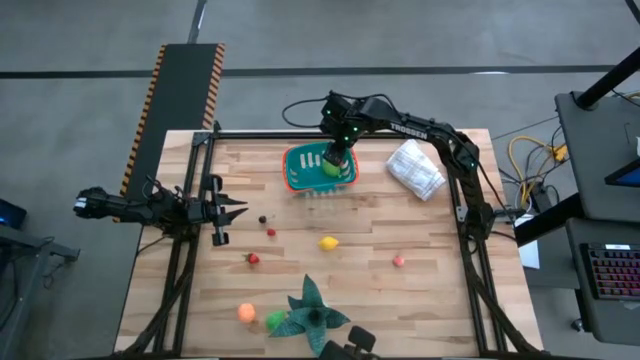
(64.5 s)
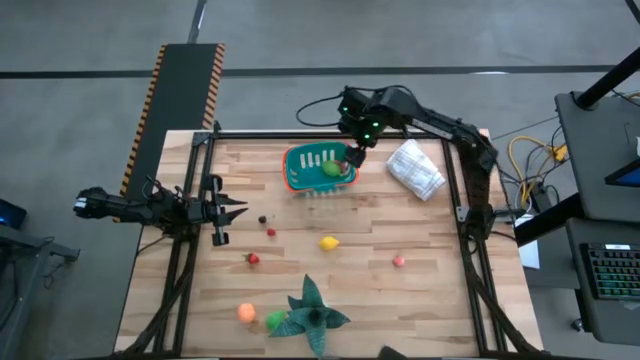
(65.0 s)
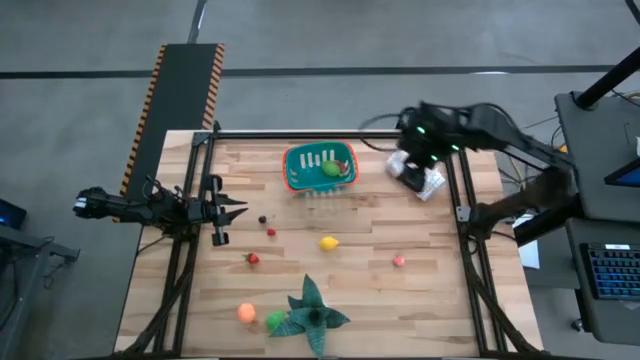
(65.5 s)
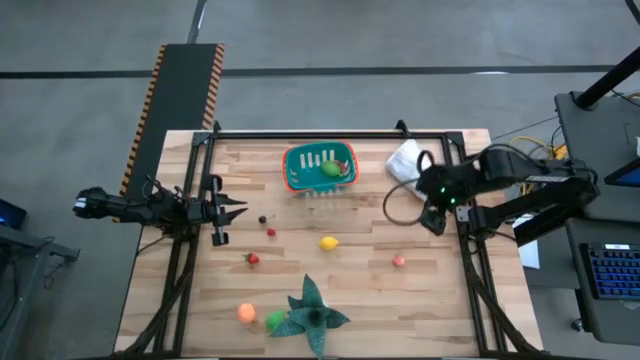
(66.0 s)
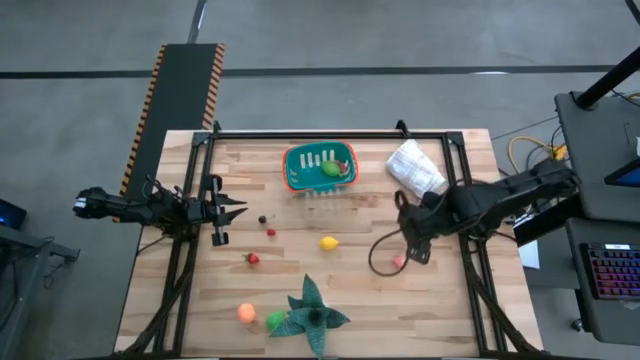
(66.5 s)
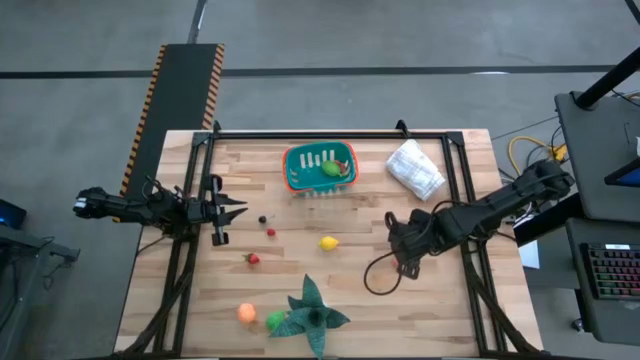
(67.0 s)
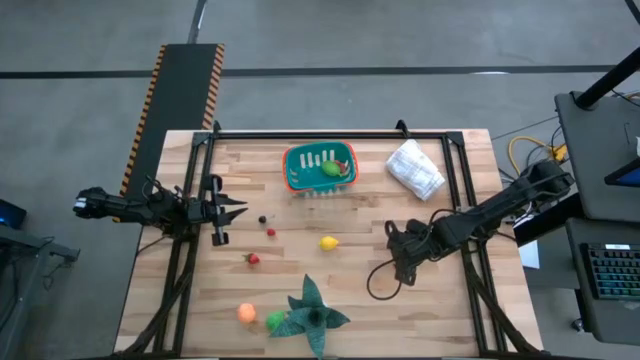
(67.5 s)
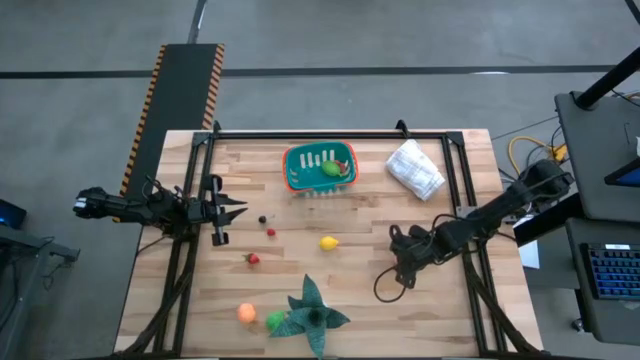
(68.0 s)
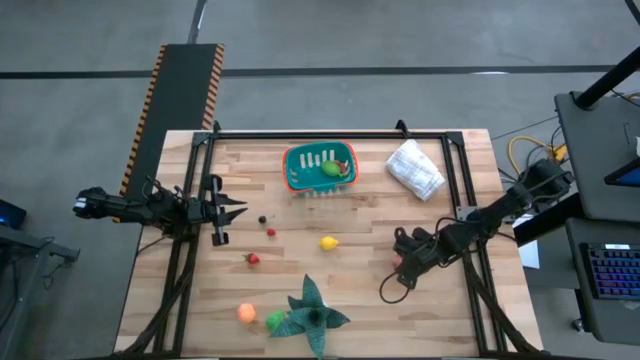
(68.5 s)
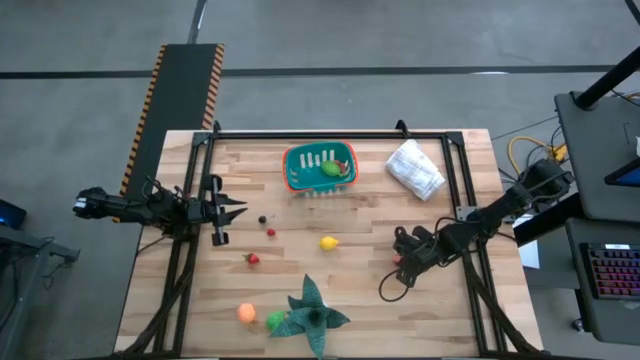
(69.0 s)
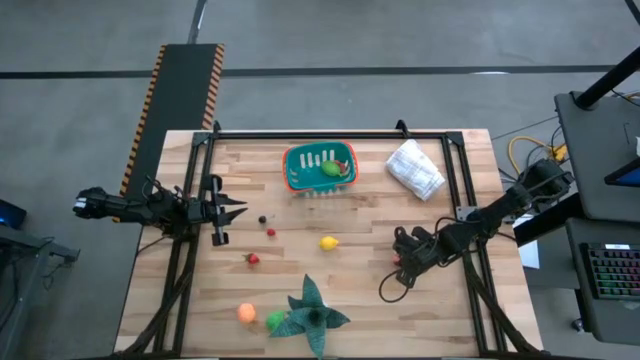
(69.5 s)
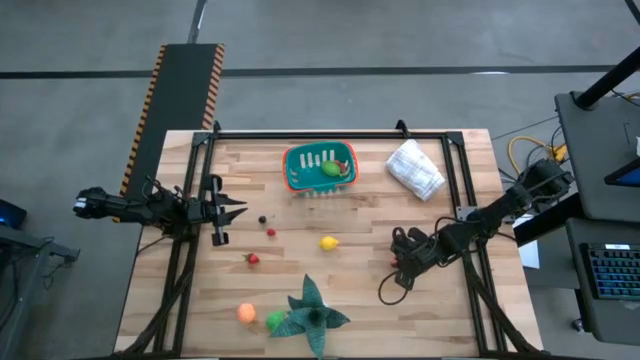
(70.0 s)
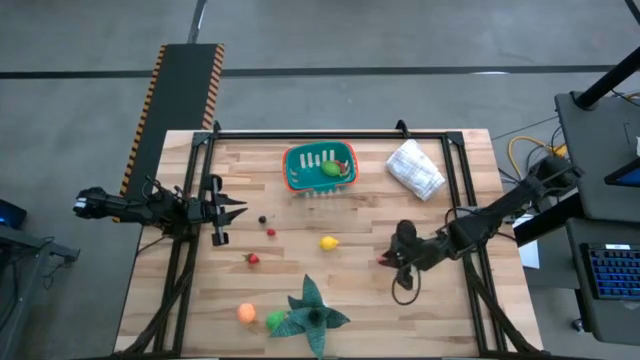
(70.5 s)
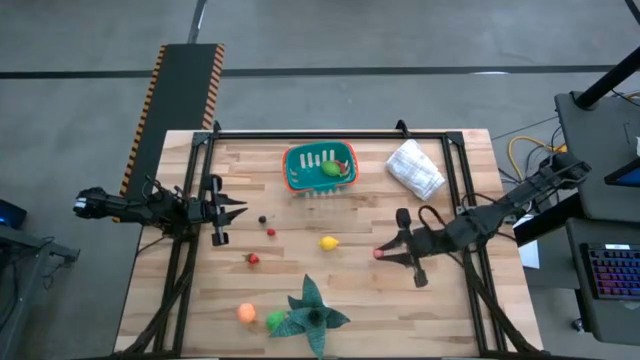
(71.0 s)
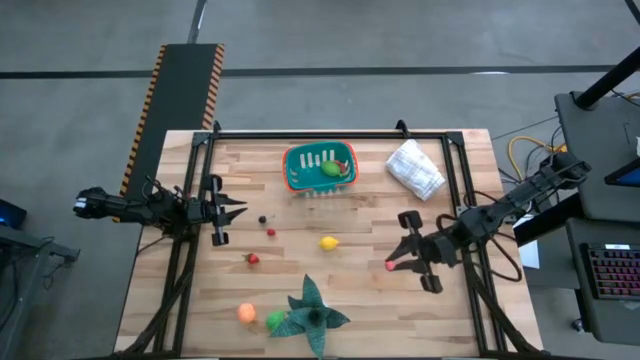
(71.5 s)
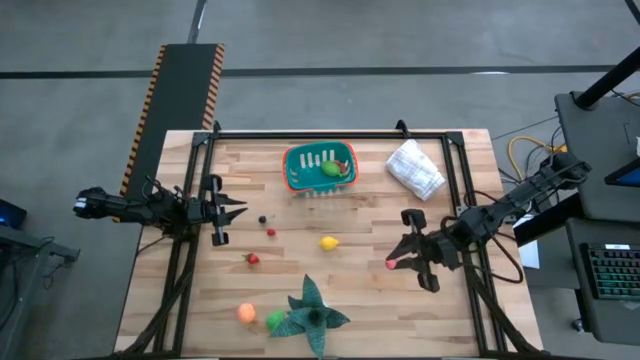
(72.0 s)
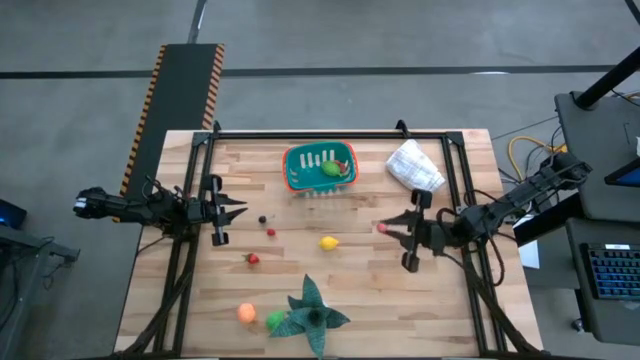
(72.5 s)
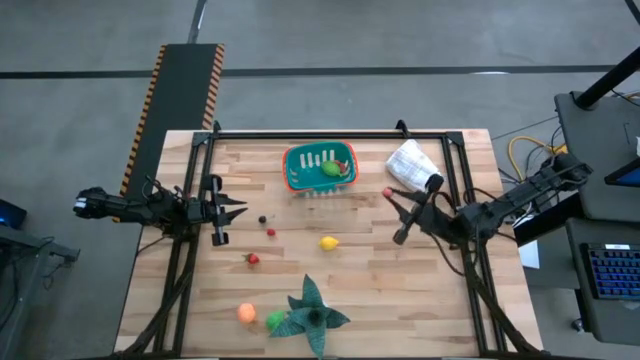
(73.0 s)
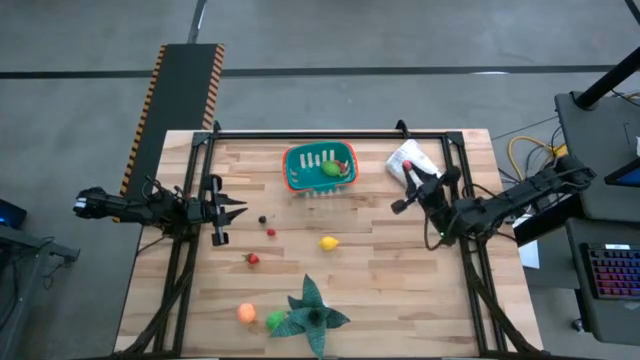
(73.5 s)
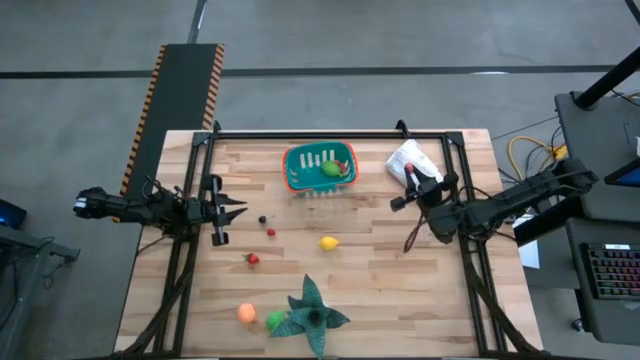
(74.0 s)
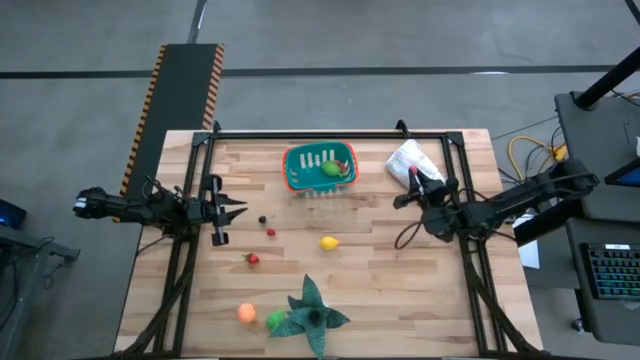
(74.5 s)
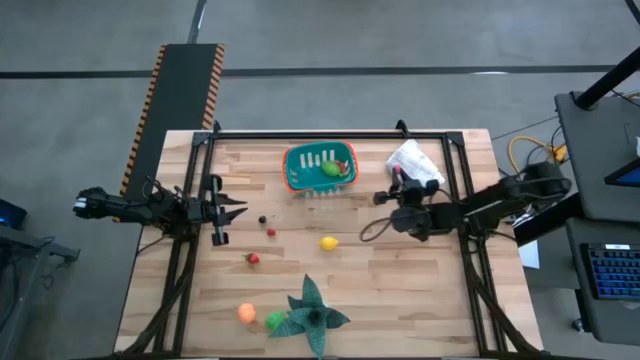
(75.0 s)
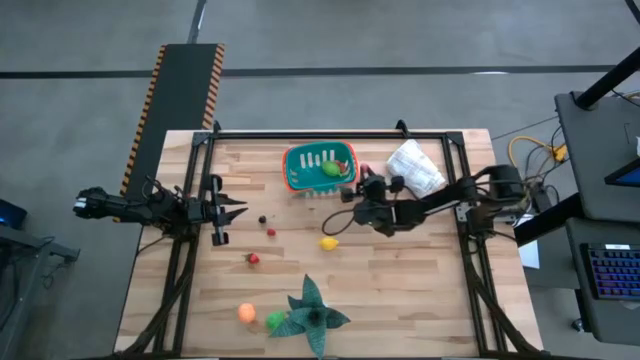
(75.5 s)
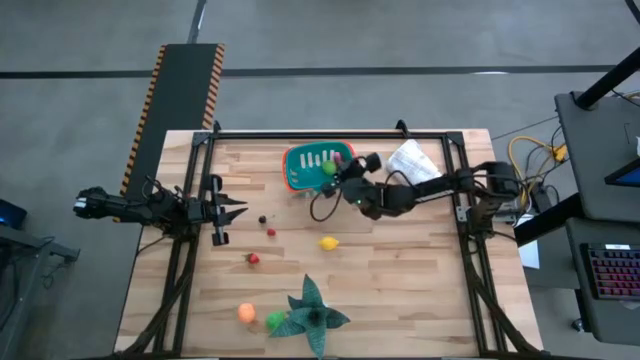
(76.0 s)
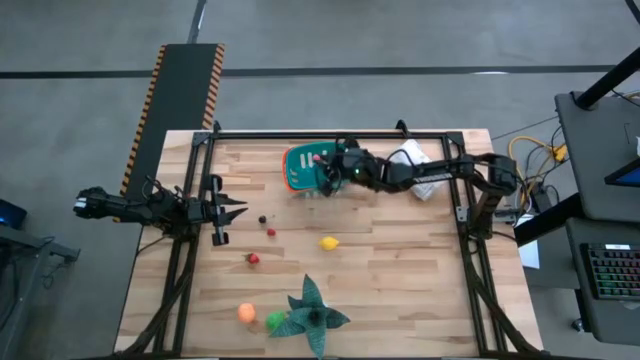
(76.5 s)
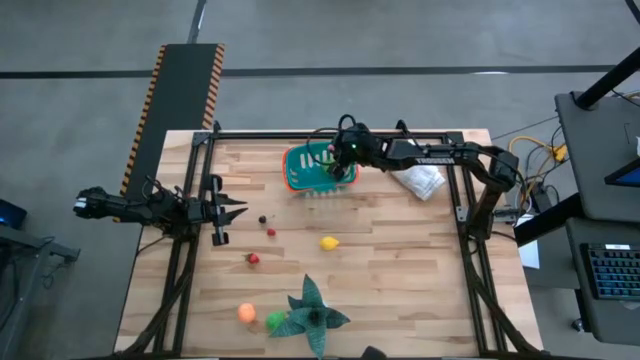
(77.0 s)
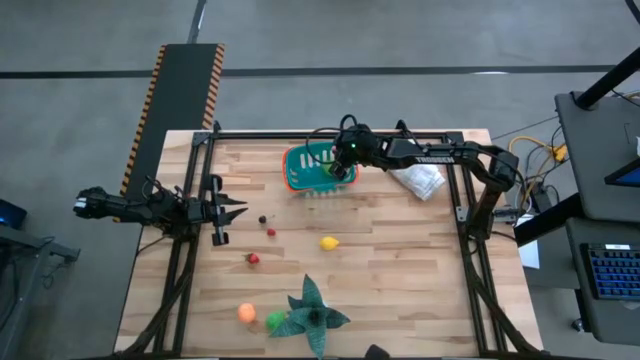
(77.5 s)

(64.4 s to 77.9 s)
Task: Pick and placing Produce into tupperware
Put the peach toy into the bin

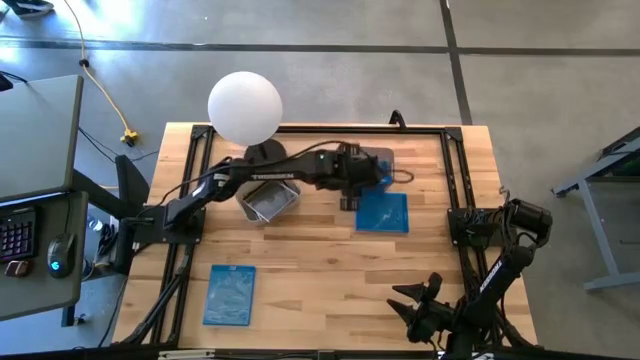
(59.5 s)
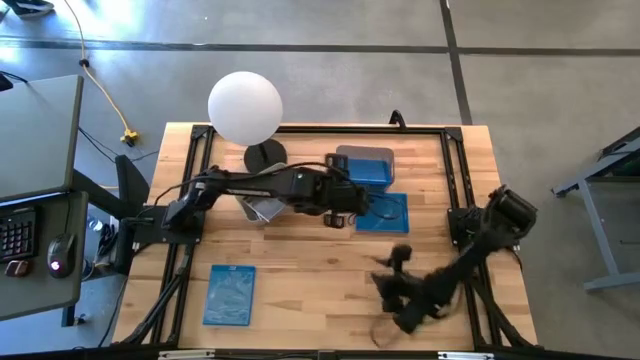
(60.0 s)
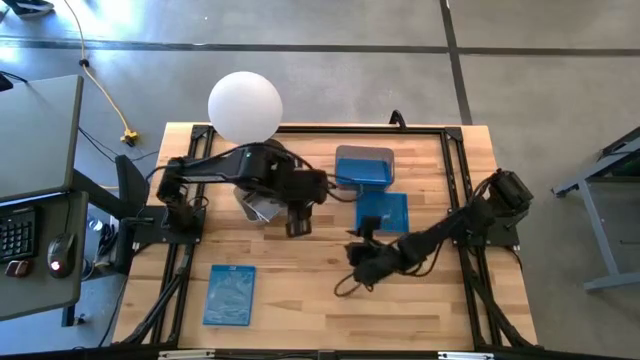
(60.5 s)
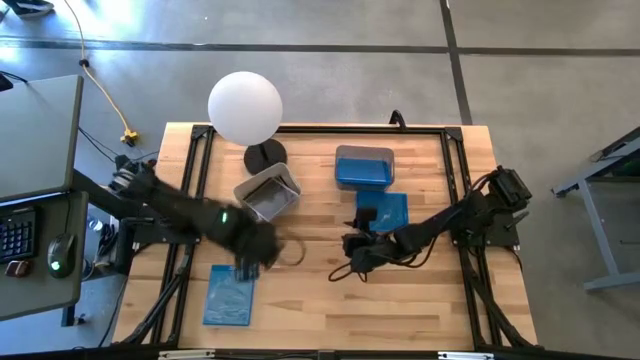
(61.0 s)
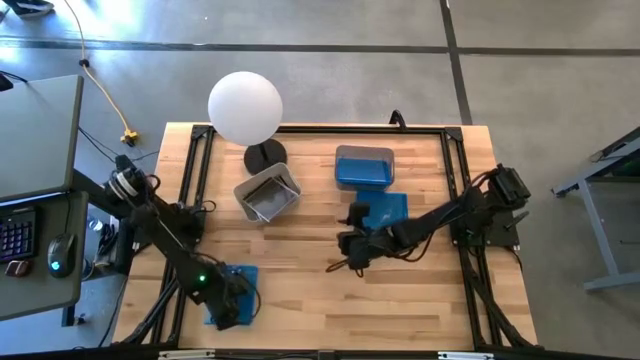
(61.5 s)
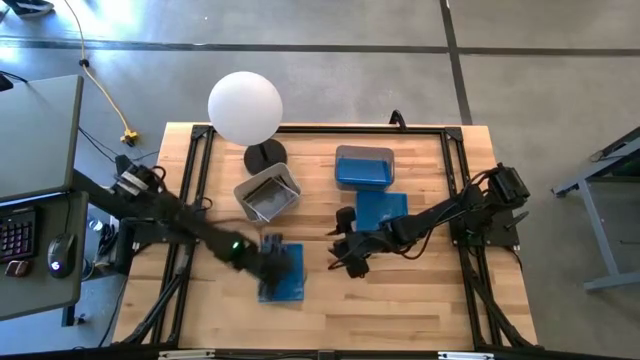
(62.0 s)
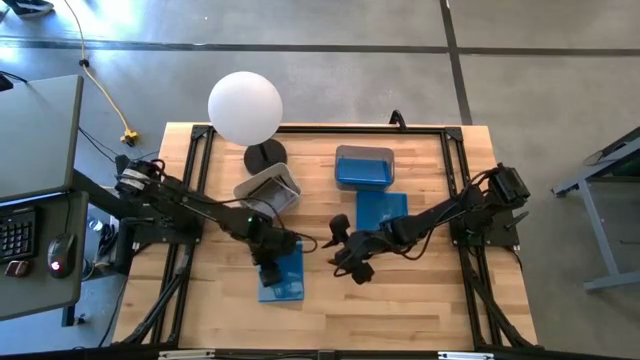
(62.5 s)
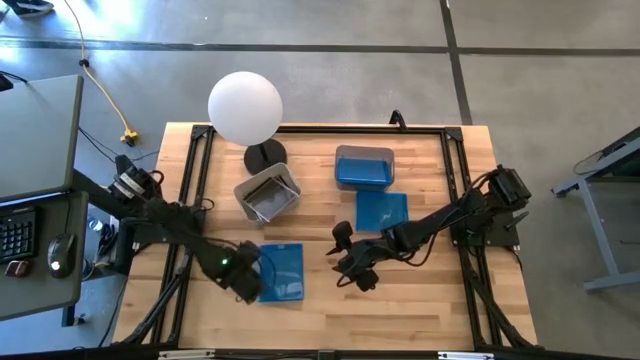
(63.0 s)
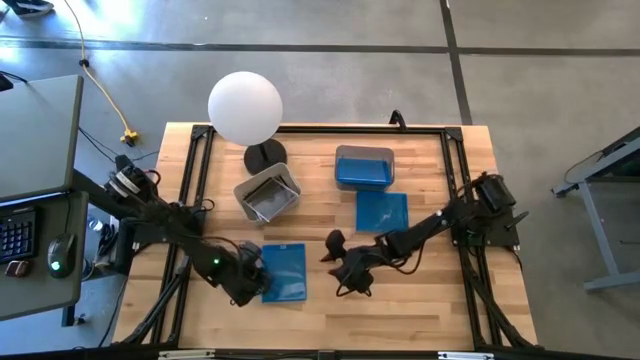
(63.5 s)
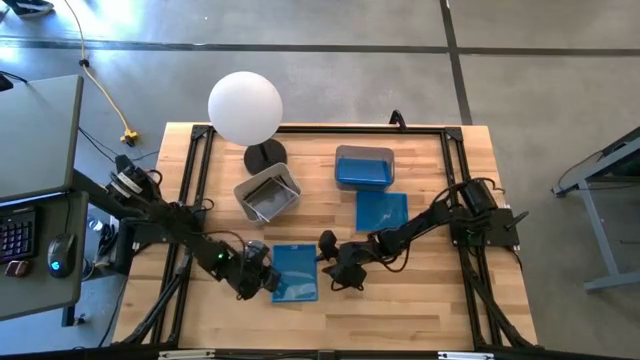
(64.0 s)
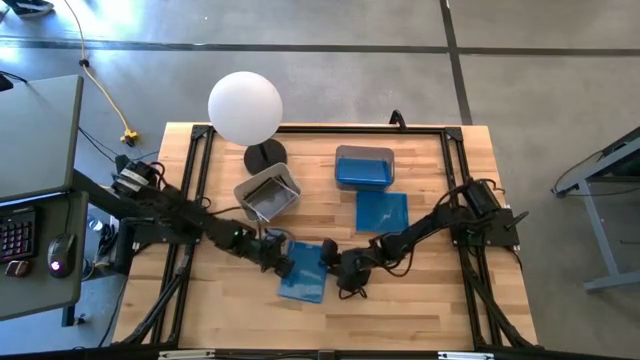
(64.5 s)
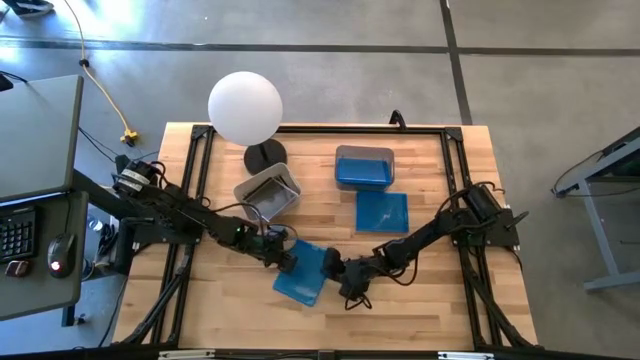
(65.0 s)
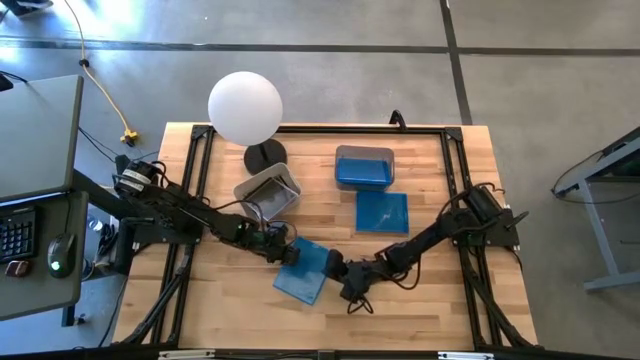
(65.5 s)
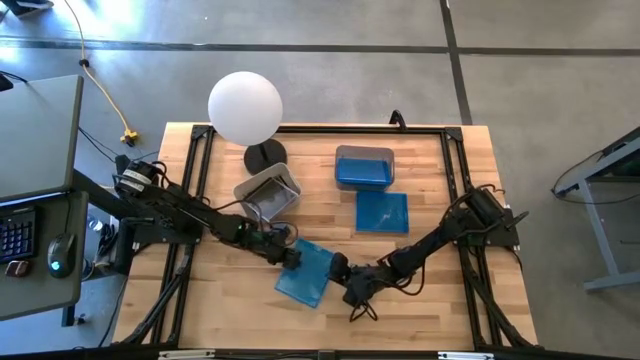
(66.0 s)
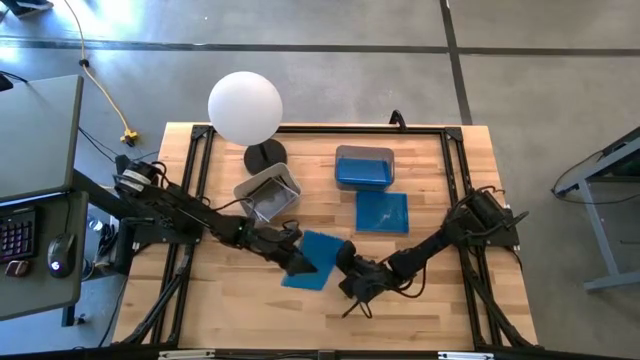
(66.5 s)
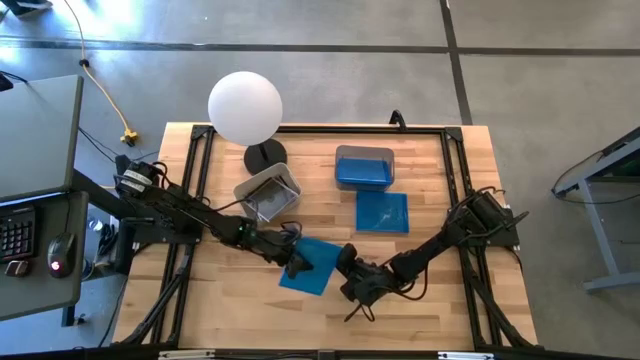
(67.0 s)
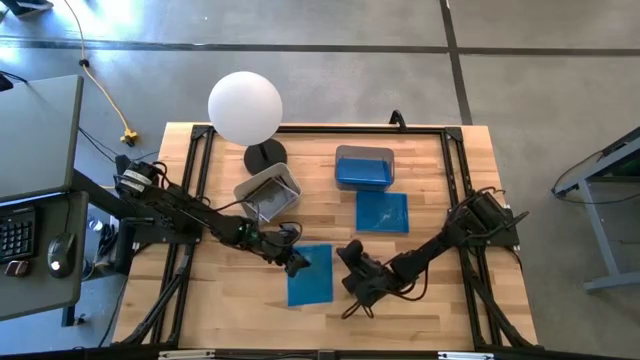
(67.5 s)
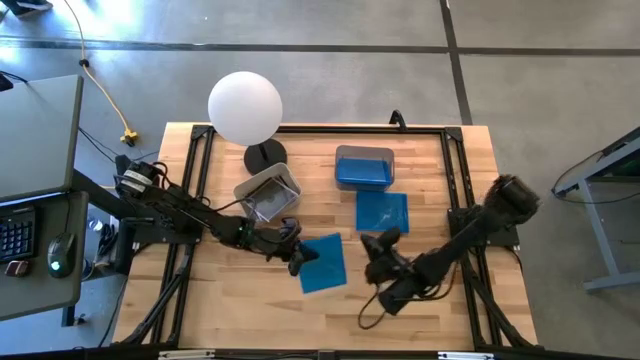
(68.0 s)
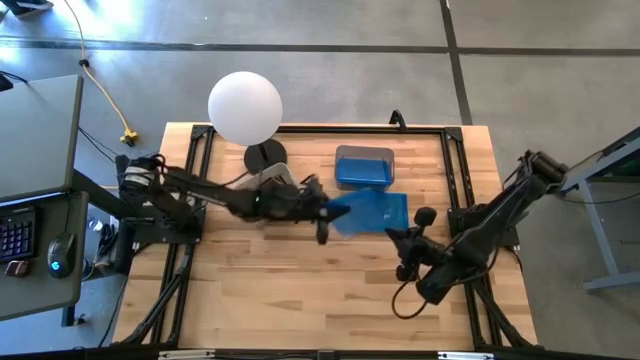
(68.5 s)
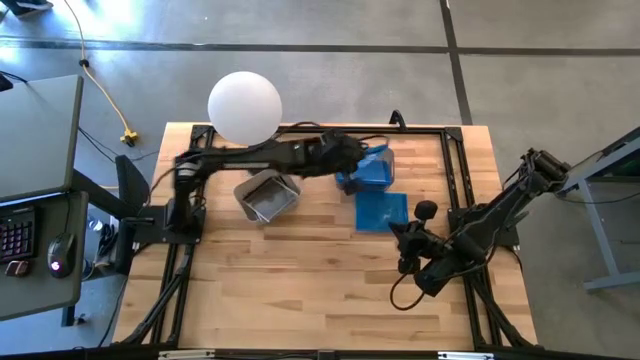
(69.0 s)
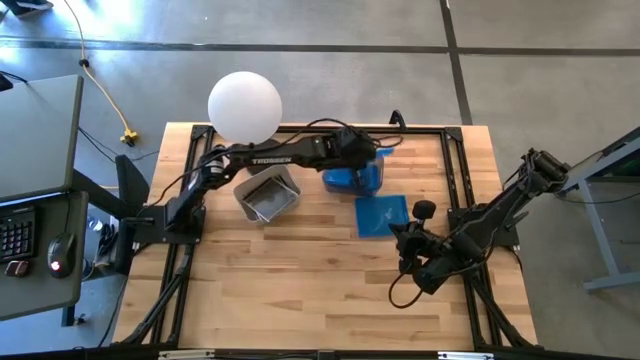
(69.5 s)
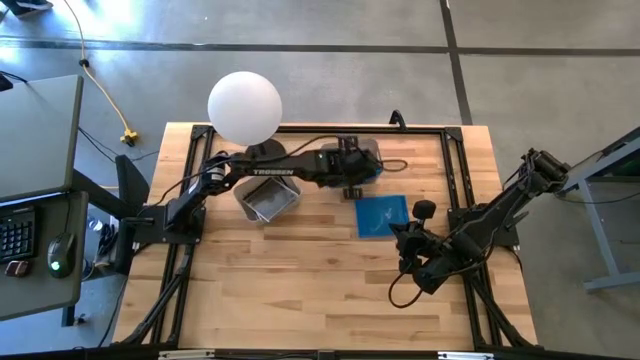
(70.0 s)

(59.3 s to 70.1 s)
Task: Pick & place jewel cases by type
Put the left blue CD case into the black bin
